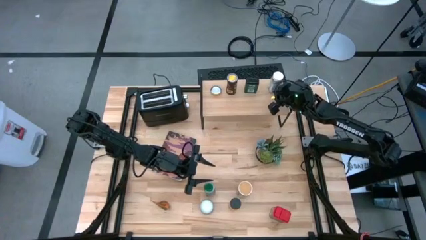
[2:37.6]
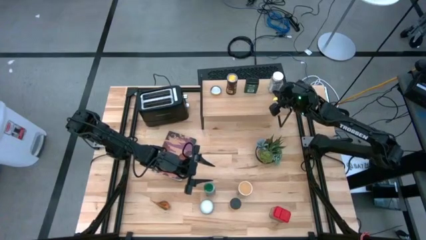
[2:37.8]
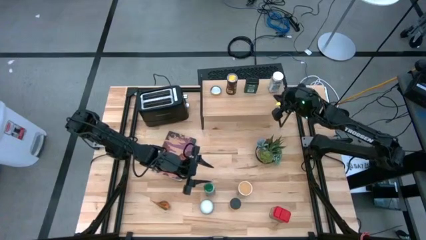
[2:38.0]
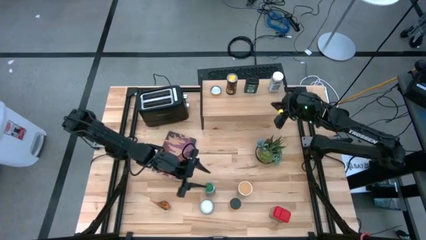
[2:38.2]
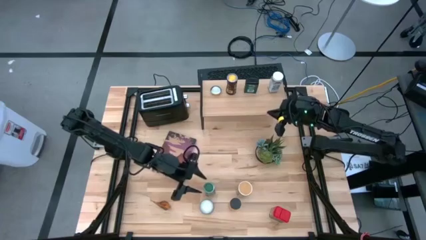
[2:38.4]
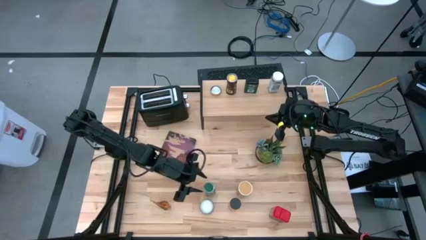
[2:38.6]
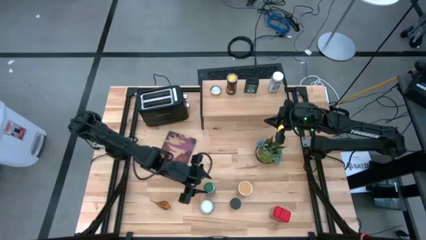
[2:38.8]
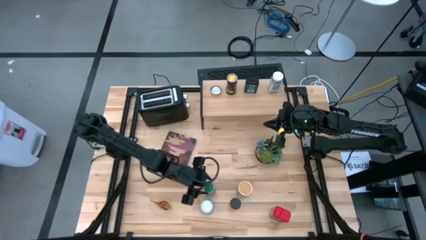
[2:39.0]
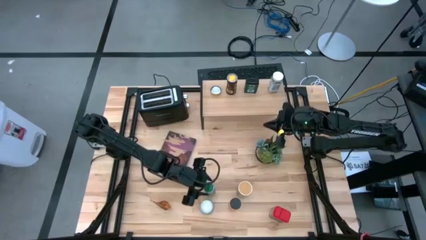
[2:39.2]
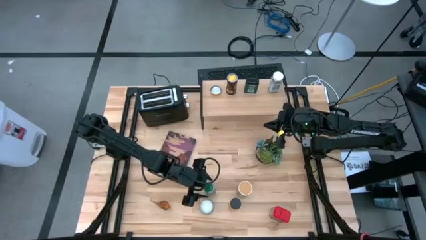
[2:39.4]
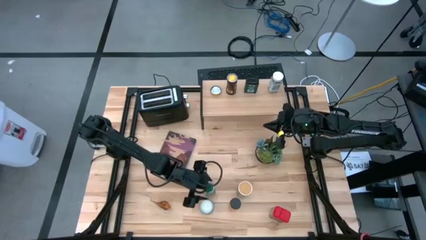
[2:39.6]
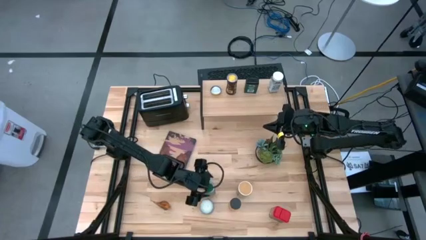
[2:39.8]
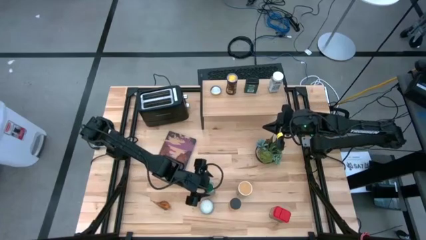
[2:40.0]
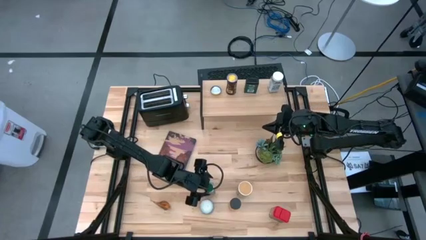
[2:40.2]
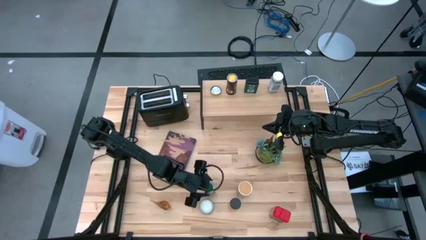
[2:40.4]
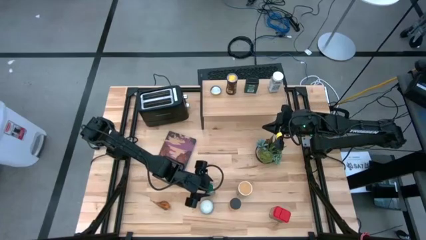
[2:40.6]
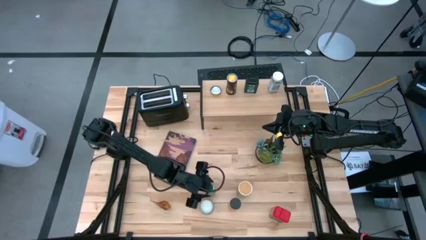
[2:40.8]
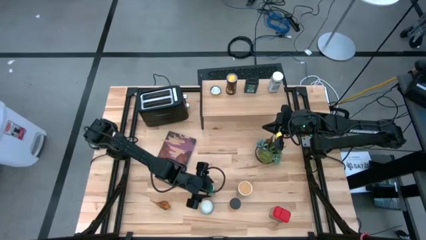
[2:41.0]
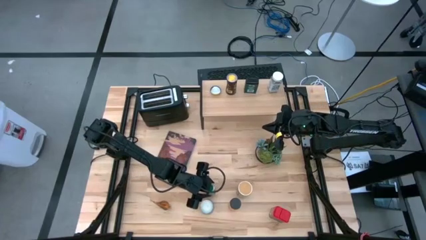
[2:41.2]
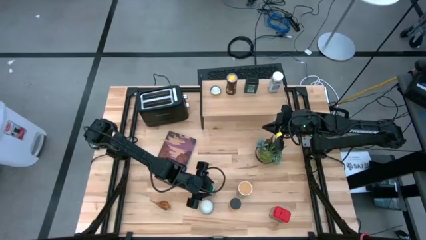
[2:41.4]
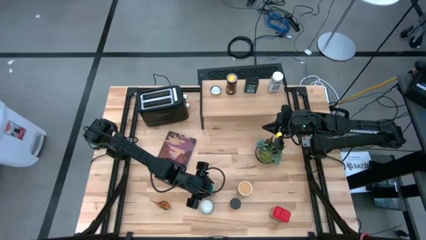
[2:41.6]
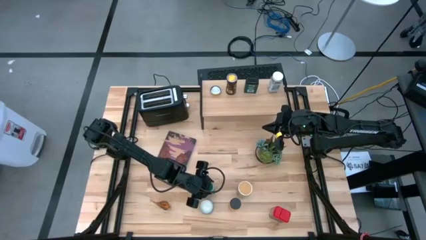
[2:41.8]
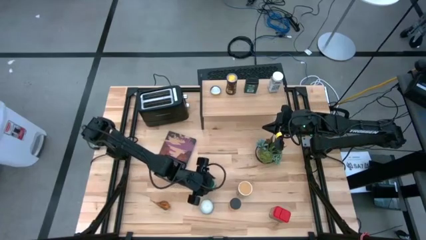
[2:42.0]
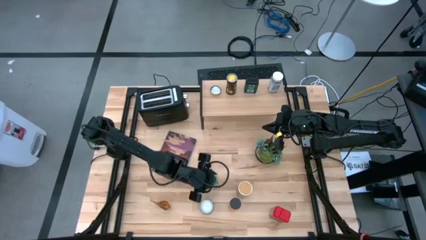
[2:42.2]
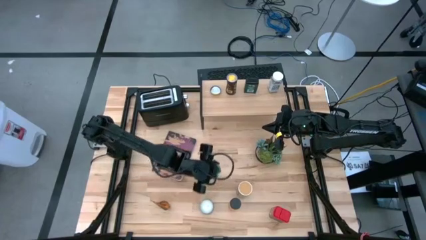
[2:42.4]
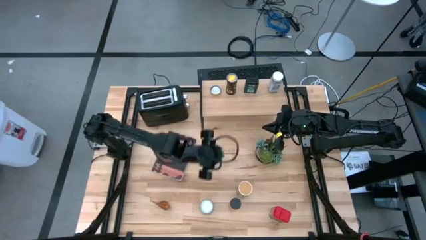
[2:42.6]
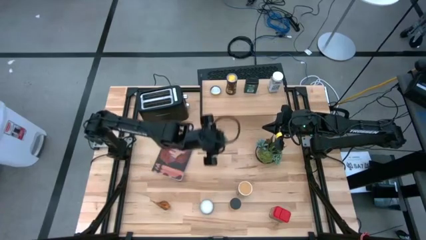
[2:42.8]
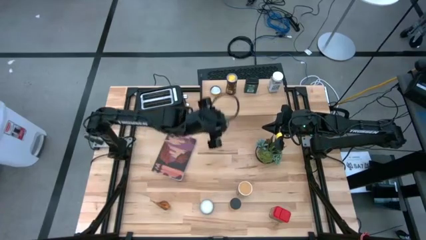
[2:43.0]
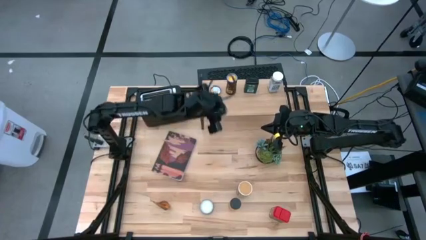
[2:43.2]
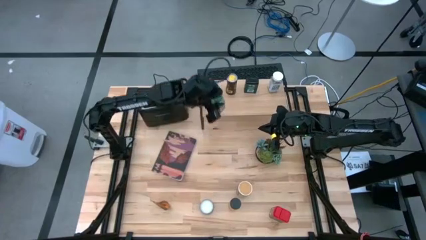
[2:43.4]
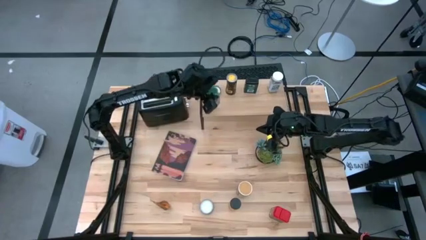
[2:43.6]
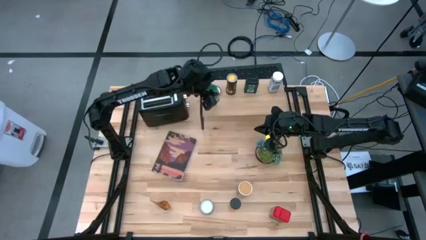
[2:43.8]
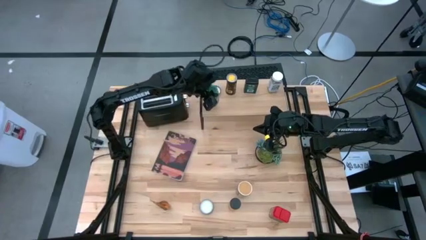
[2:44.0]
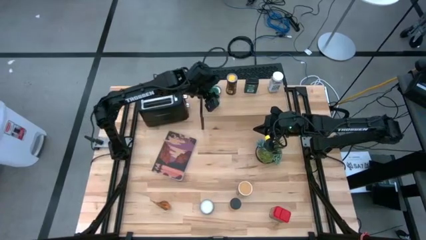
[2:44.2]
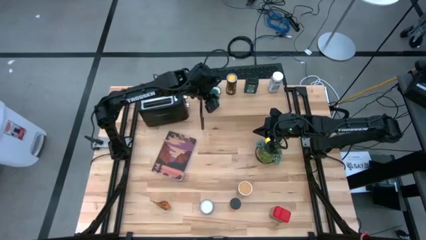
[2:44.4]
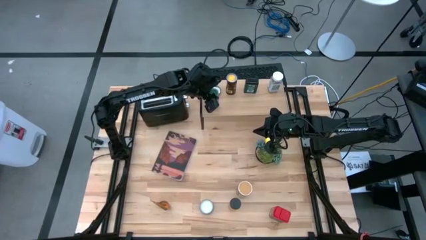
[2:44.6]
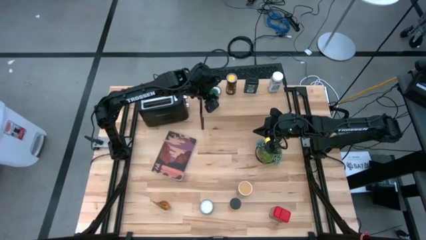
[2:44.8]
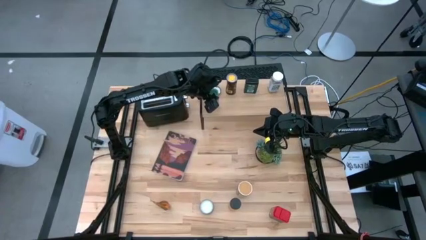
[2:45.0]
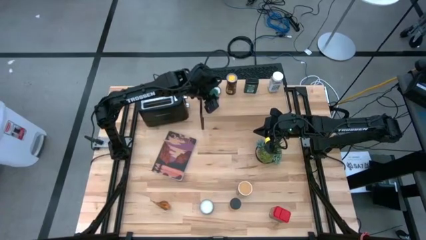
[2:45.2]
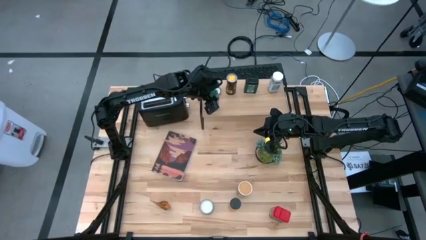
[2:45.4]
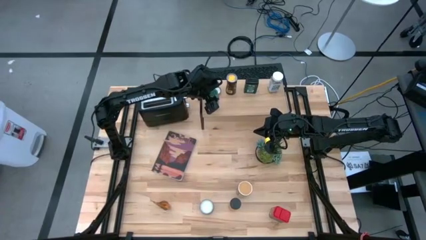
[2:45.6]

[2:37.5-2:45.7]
Task: Shelf spices
Put the green seasoning bottle on the shelf

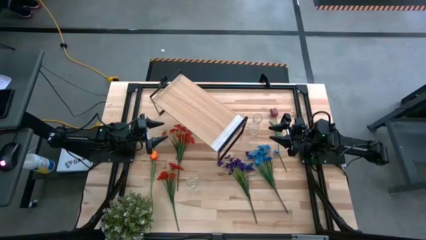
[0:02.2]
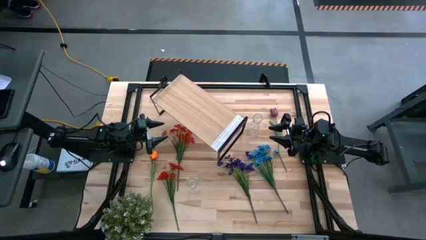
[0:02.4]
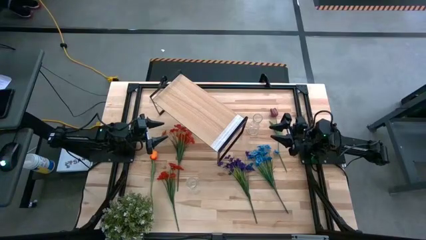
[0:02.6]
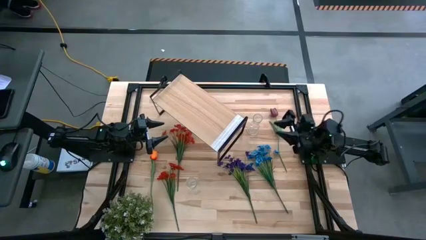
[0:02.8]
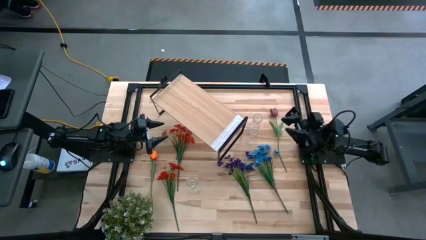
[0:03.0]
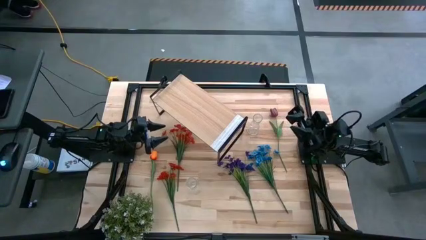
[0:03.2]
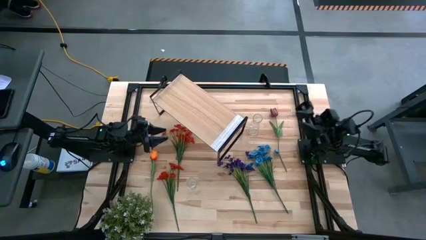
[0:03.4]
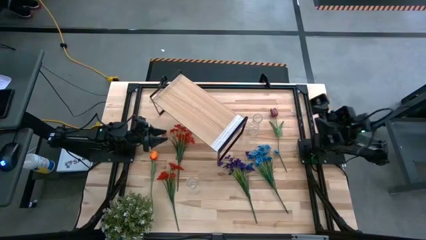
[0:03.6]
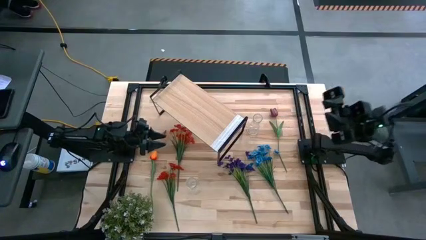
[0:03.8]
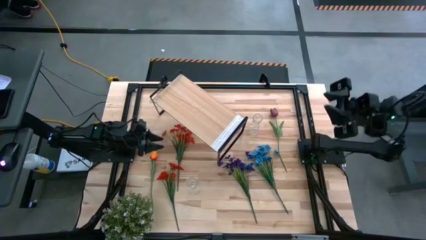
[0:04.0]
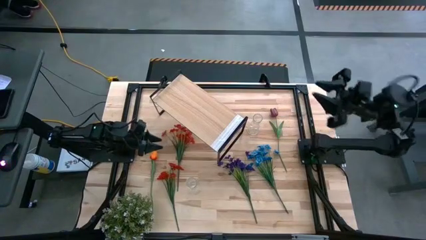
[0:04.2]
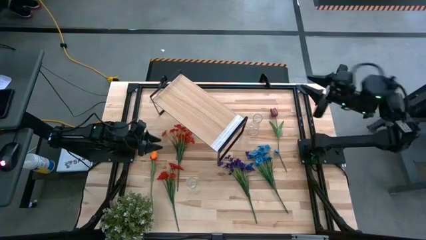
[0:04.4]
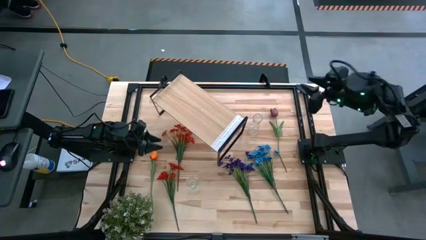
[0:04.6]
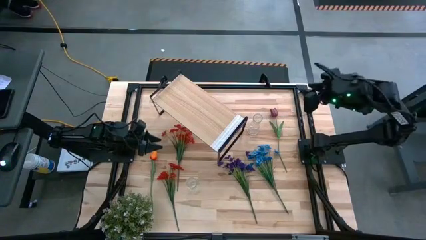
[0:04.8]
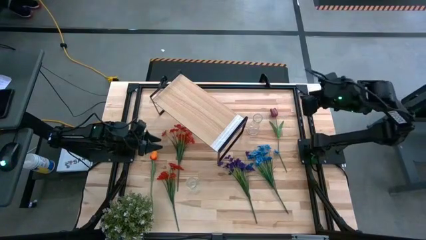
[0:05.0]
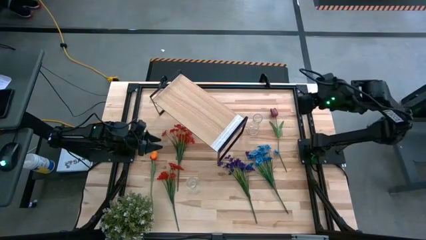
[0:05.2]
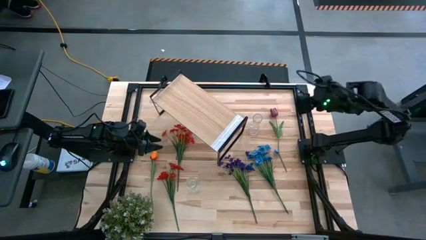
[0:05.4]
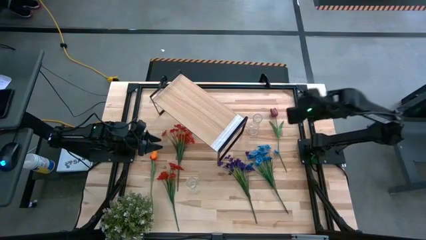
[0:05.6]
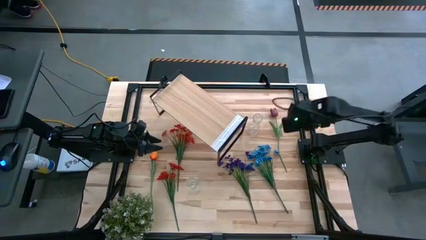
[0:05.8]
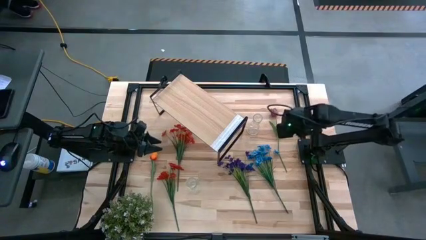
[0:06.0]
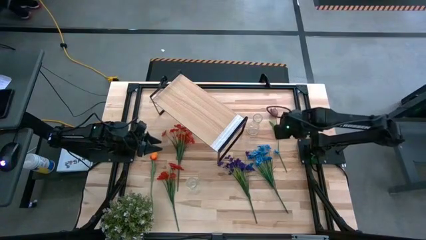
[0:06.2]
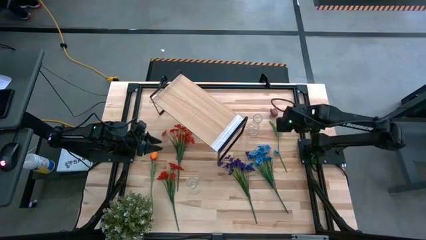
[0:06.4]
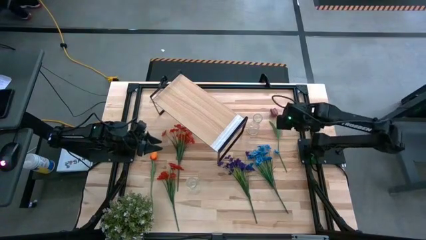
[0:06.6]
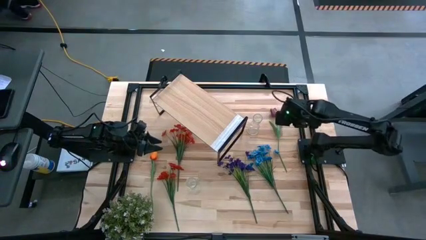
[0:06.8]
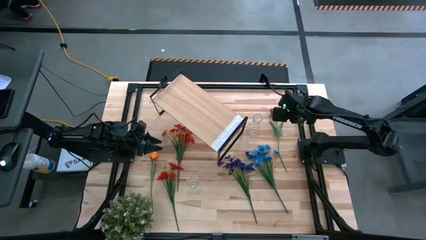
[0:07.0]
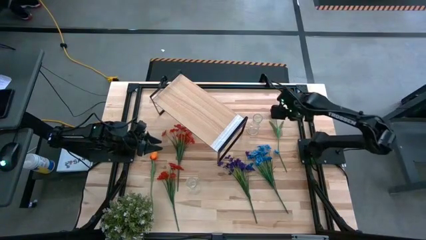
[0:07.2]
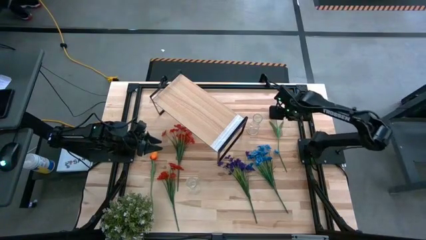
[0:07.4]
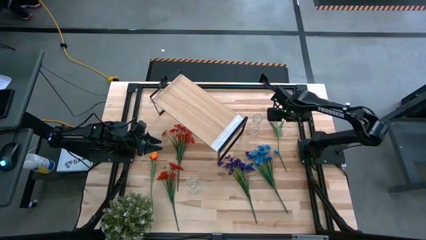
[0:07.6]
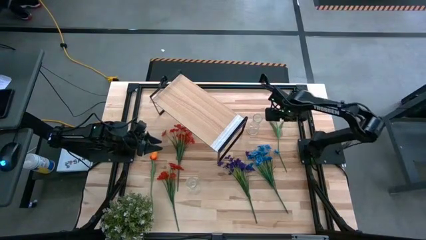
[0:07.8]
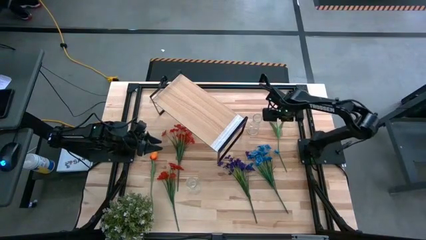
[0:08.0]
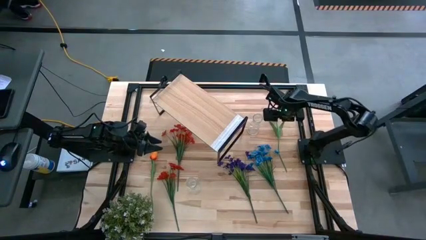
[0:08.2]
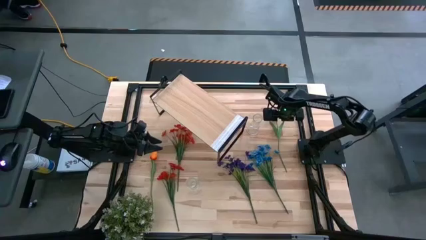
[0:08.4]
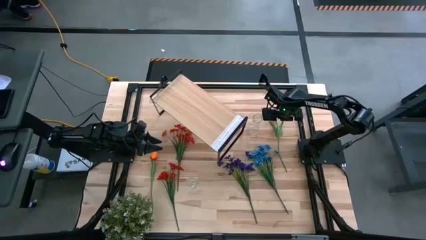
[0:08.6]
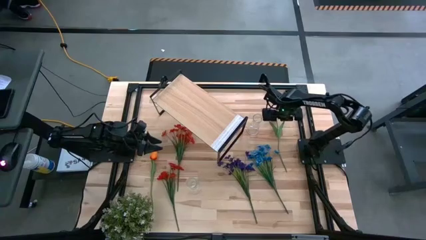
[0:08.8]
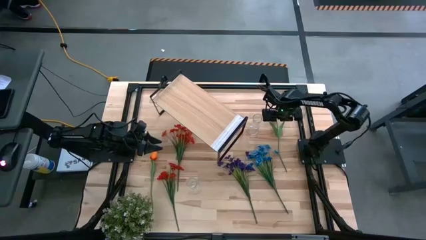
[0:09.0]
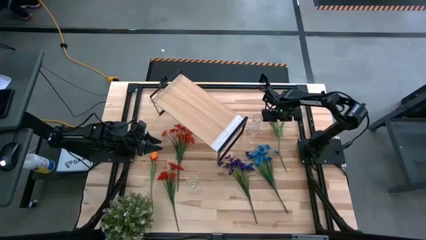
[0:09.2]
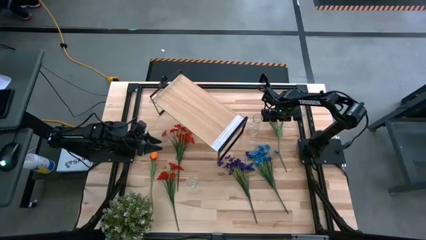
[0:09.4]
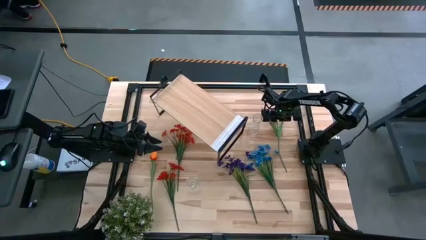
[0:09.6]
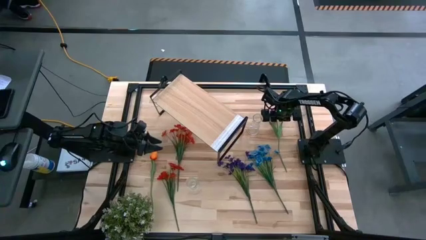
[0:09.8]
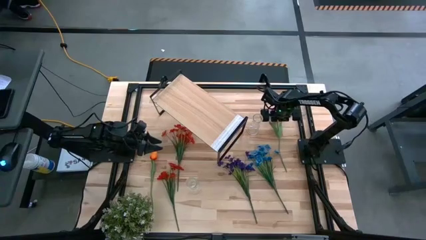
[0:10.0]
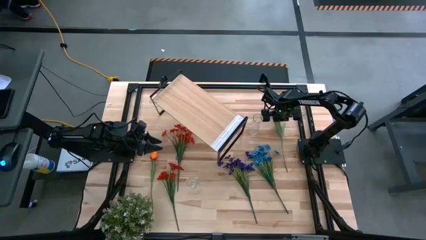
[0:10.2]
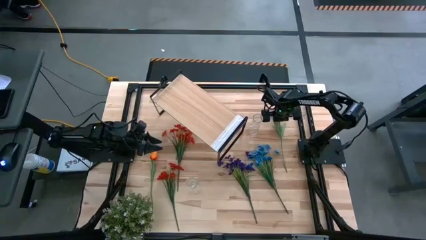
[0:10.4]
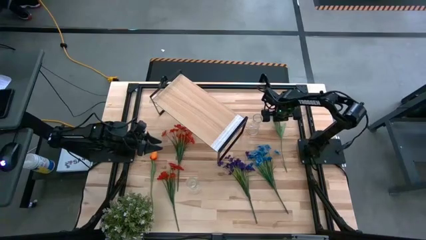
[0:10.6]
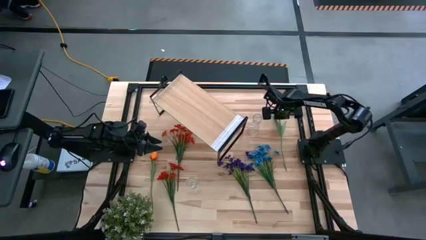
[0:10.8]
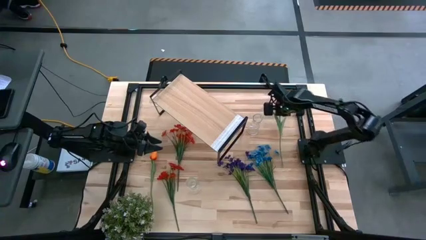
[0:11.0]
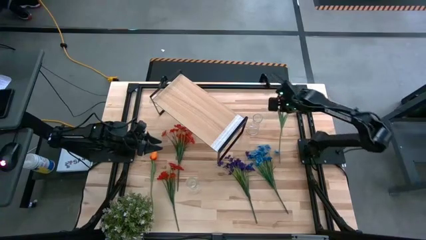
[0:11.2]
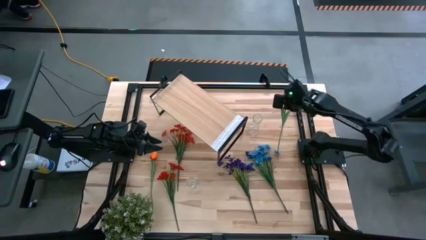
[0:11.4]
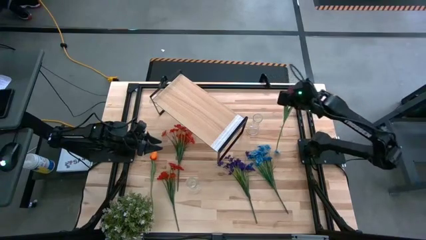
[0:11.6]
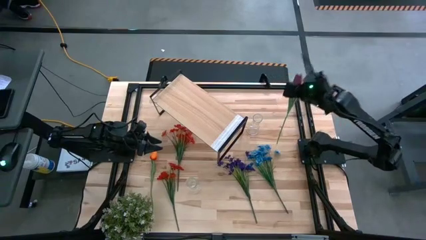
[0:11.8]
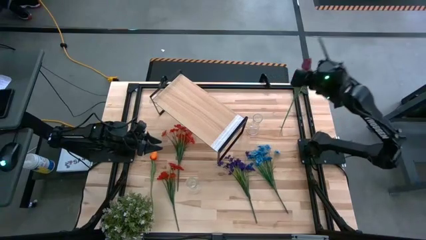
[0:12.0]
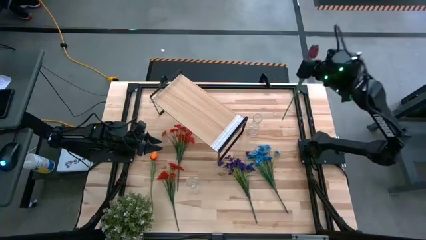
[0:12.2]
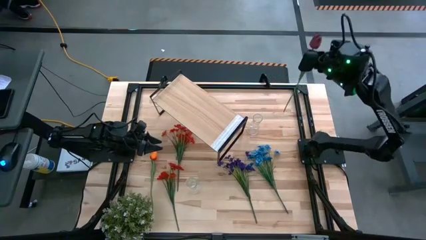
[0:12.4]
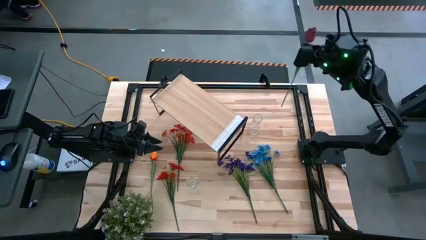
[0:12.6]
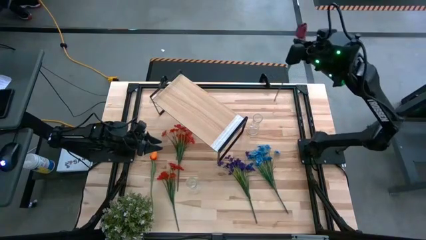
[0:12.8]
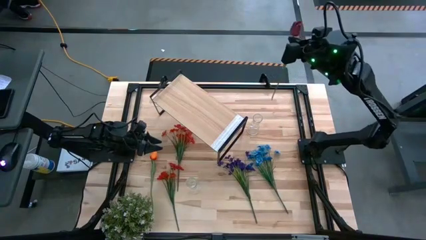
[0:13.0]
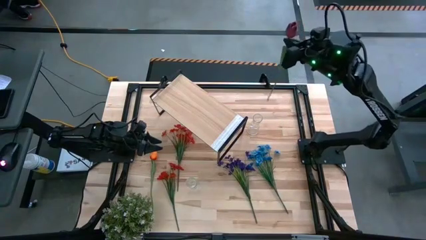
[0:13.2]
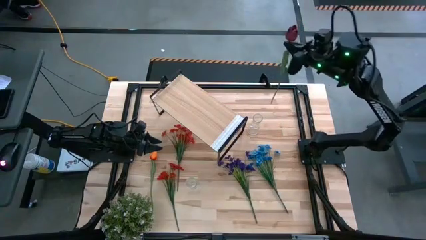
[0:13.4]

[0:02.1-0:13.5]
Task: Pick and place flowers into a vace then onto a shelf
Put the dark red flower into the top transparent vase
